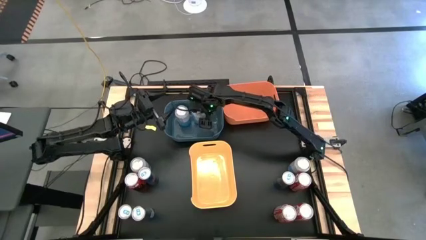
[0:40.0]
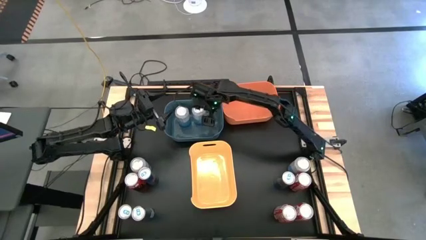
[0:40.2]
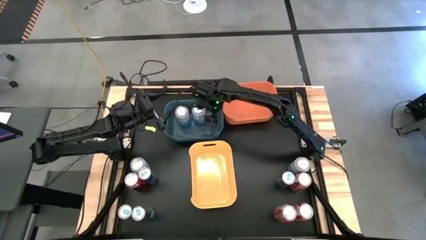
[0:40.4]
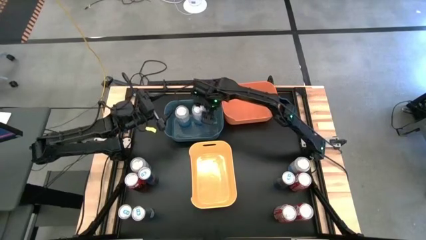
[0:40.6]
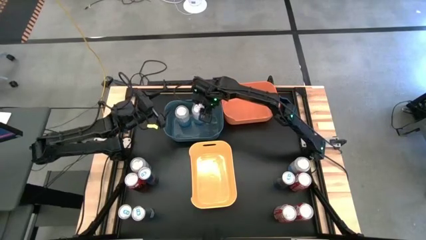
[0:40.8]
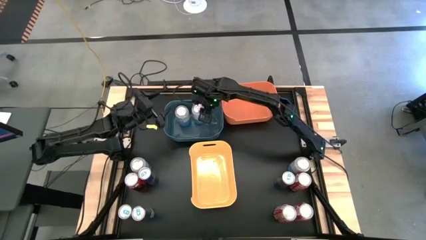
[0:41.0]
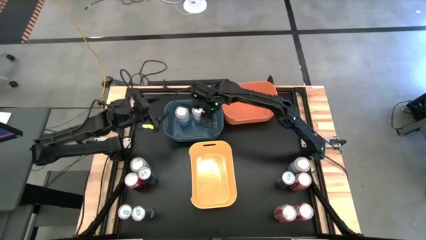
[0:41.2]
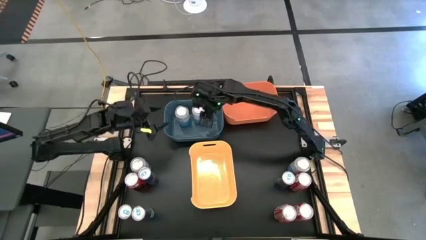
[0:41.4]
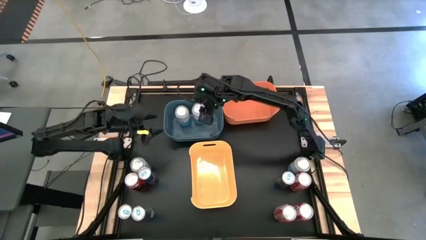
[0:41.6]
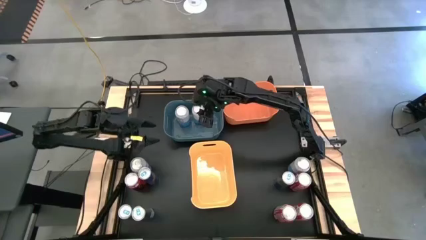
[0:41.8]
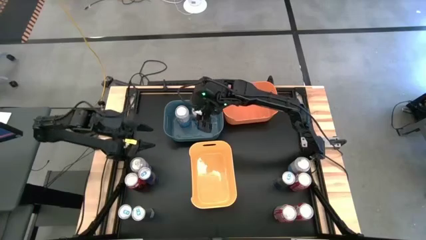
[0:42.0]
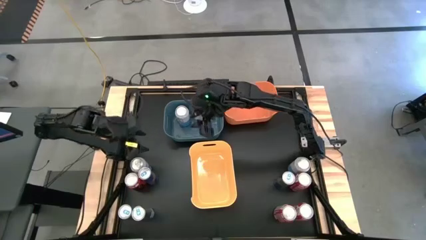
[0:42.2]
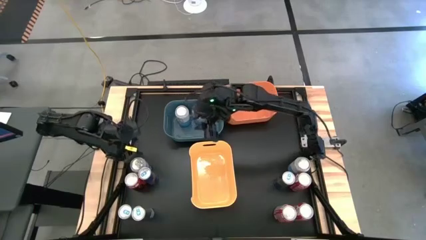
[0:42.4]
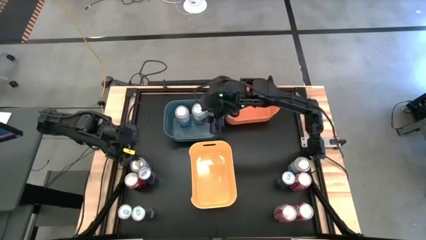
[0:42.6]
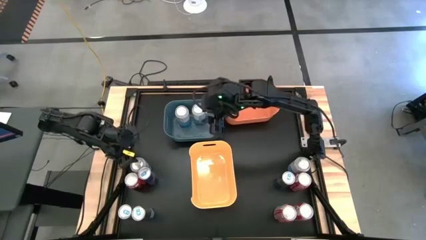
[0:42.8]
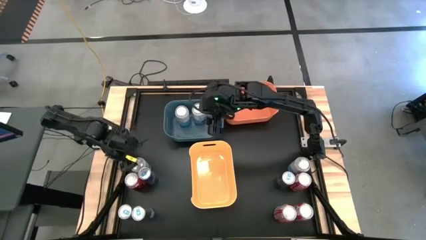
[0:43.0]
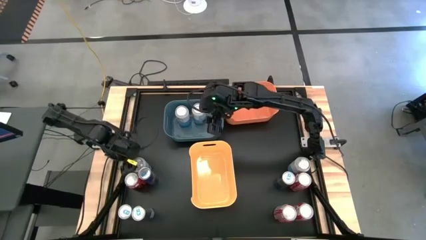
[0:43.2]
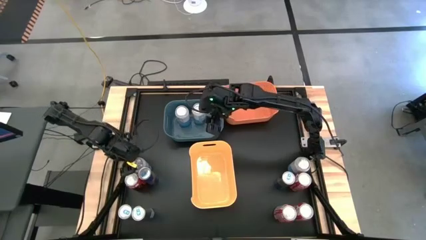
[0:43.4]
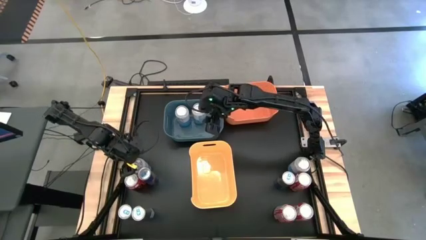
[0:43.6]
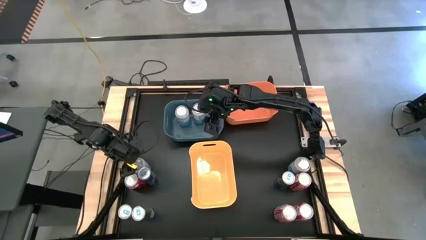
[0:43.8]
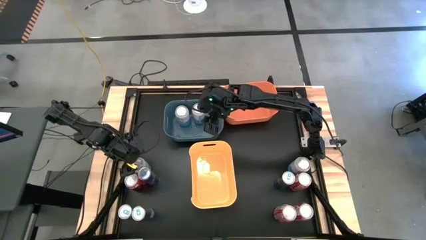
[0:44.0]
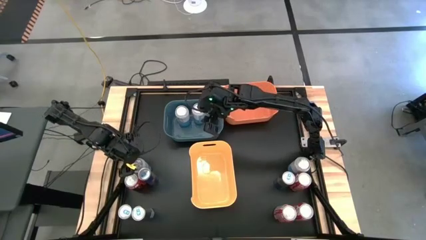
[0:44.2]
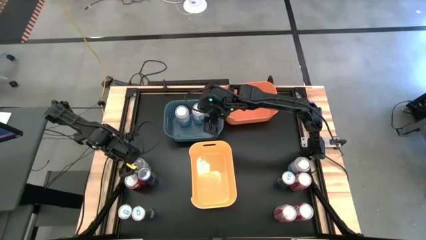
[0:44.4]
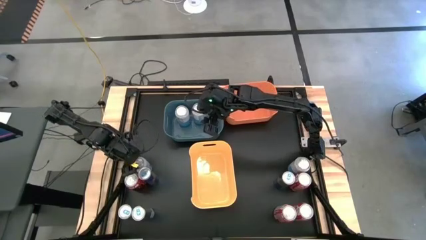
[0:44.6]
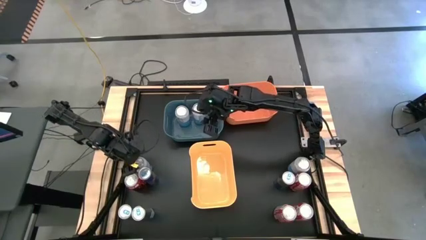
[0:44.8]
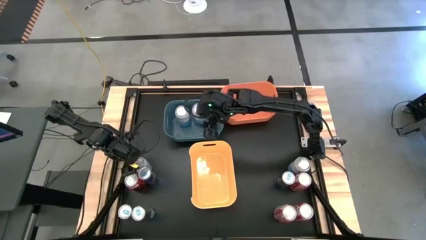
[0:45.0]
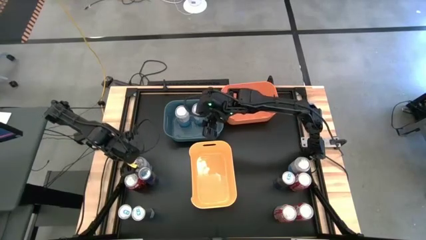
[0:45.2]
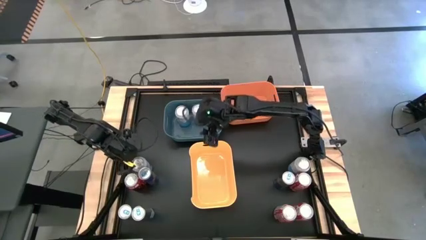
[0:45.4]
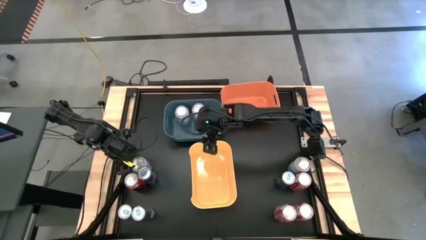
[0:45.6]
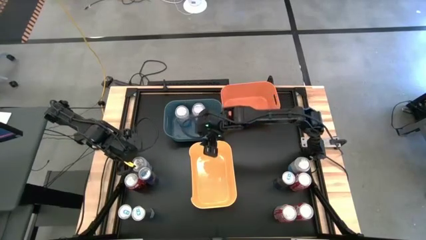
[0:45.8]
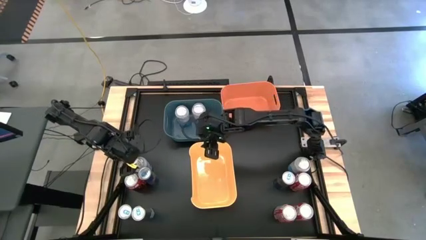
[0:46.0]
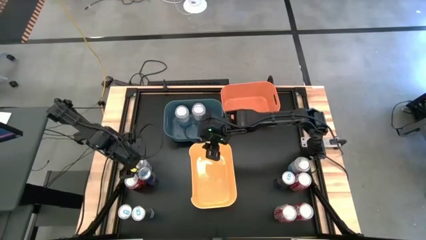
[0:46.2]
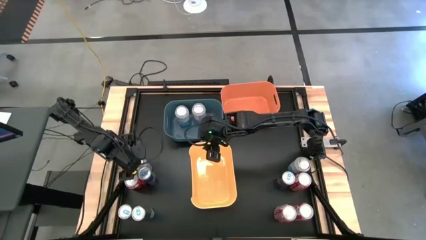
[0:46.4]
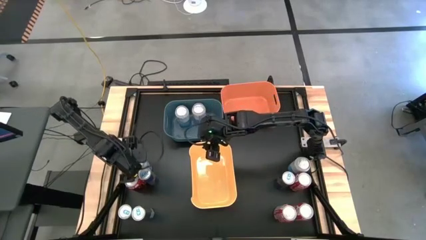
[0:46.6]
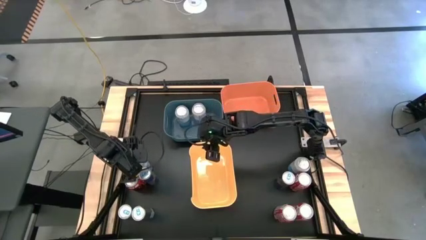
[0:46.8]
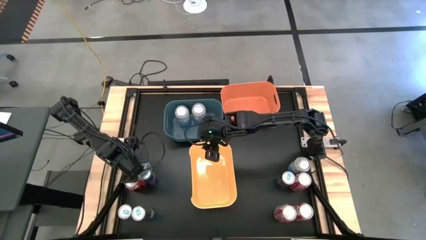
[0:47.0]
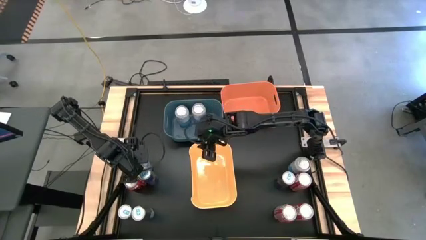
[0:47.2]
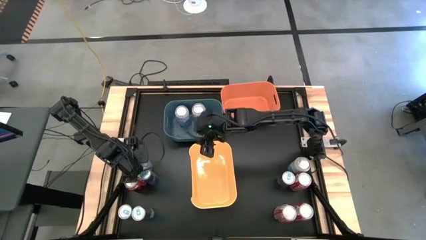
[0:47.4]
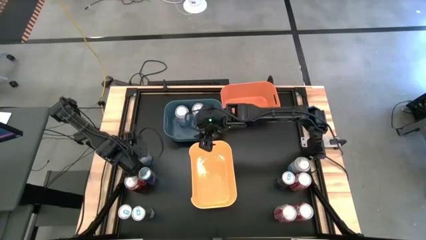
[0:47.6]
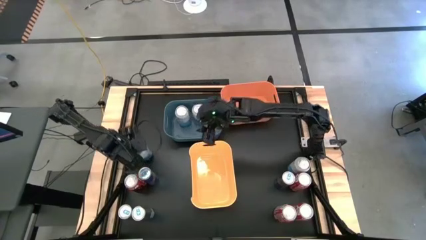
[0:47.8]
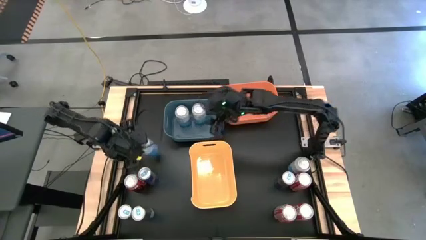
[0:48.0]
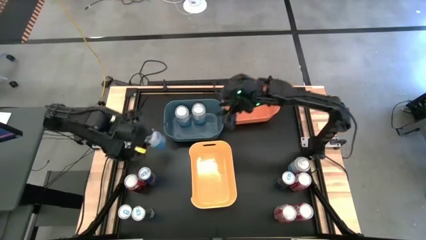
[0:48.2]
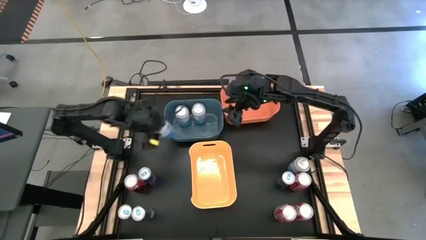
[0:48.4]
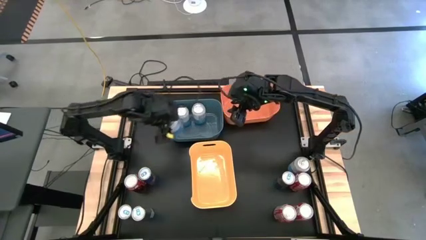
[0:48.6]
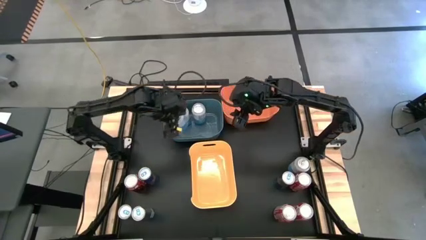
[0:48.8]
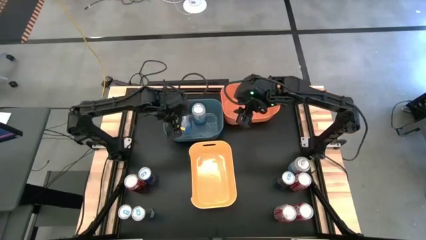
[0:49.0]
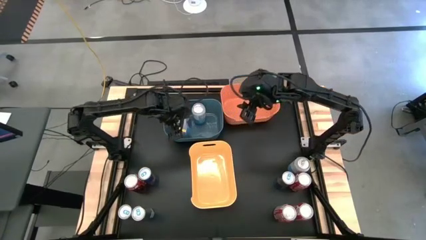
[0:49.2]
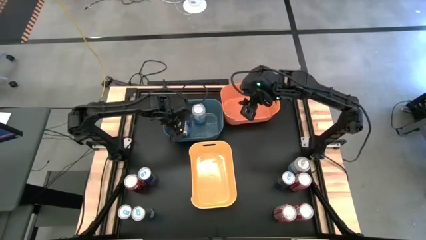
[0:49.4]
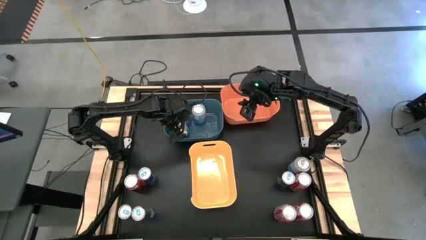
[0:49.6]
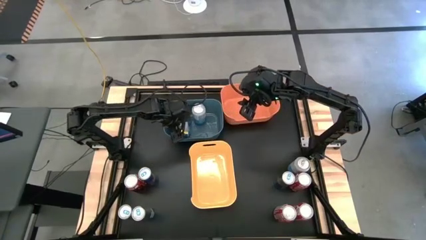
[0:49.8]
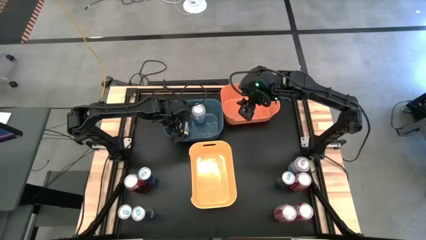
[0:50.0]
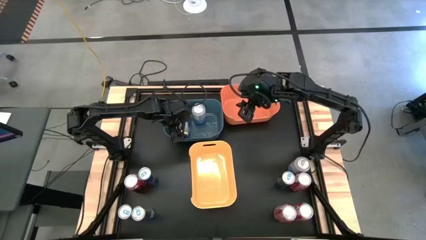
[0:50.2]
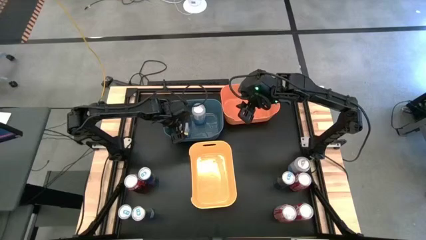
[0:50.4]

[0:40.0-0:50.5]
Task: Sort soda cans
Put the left blue-white soda can into blue bin

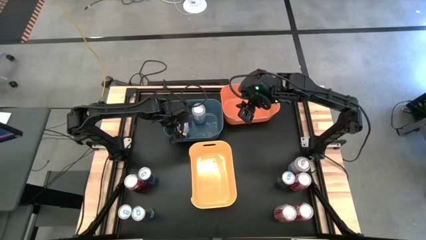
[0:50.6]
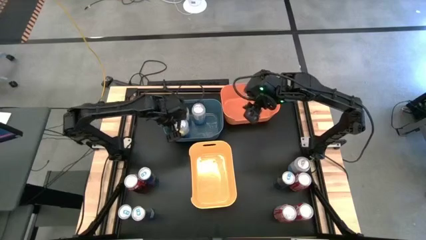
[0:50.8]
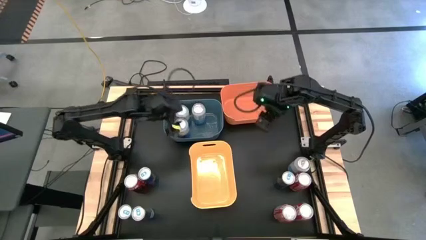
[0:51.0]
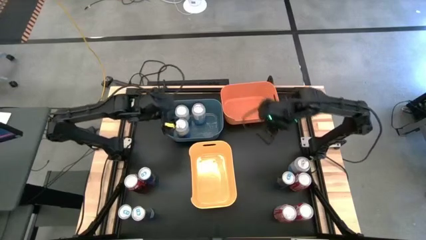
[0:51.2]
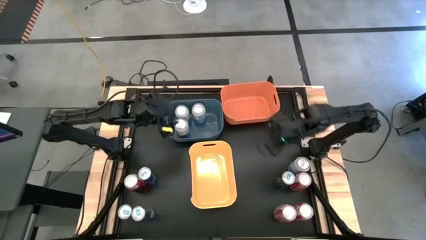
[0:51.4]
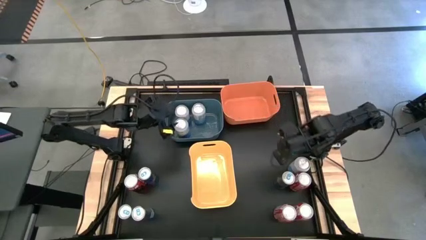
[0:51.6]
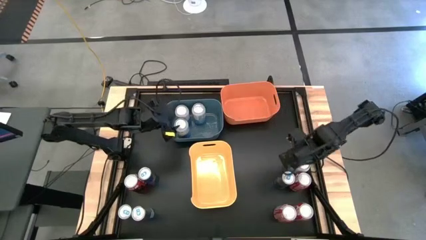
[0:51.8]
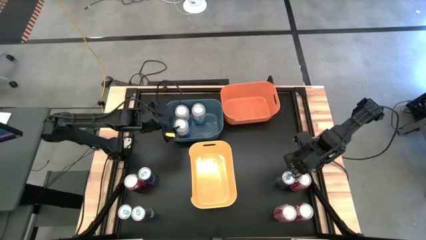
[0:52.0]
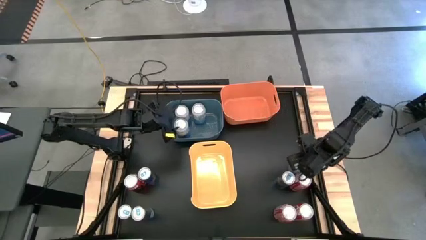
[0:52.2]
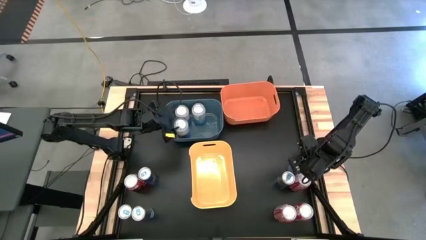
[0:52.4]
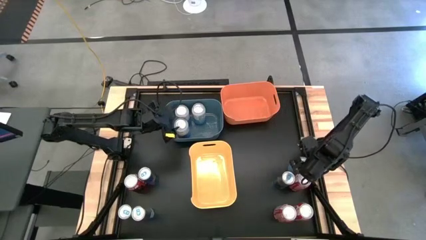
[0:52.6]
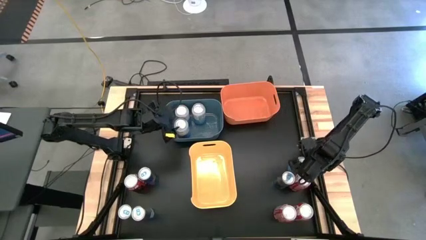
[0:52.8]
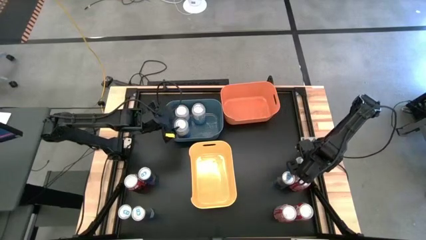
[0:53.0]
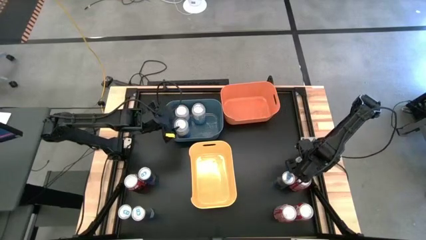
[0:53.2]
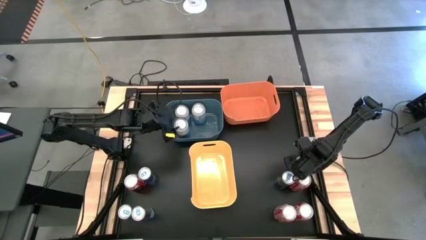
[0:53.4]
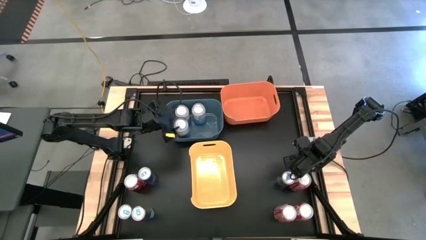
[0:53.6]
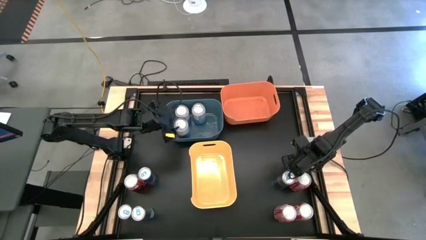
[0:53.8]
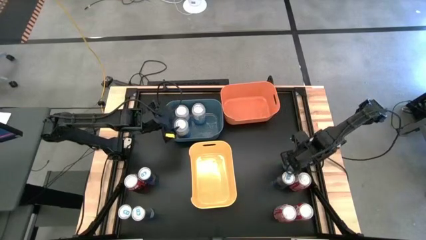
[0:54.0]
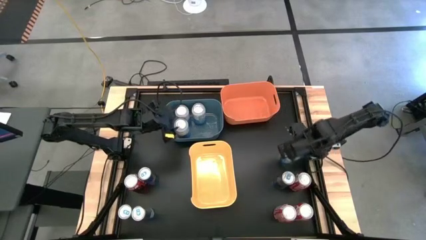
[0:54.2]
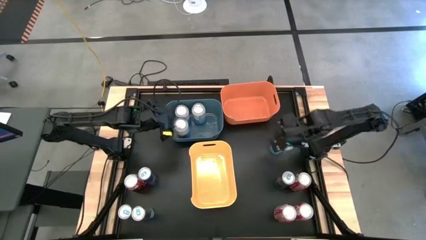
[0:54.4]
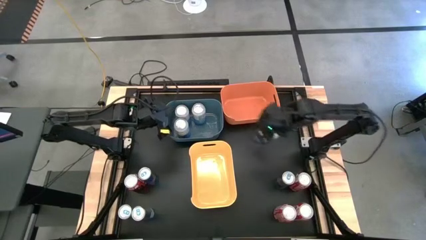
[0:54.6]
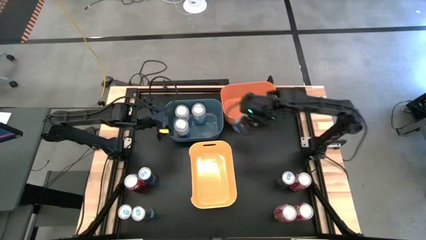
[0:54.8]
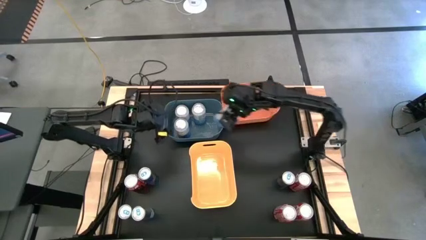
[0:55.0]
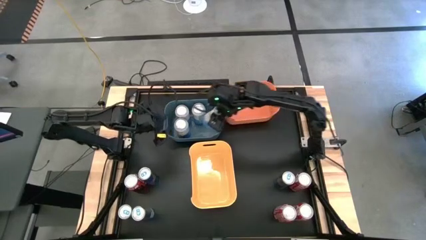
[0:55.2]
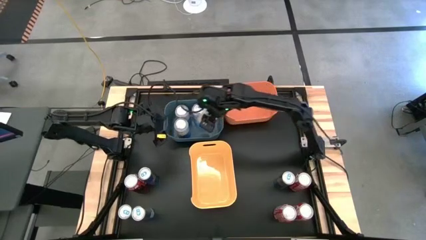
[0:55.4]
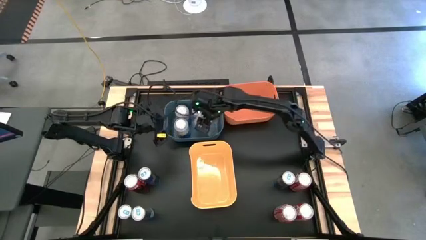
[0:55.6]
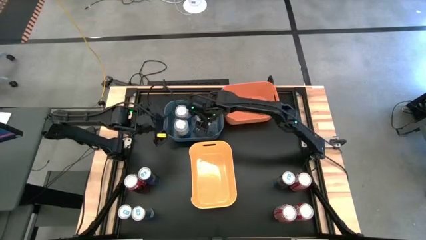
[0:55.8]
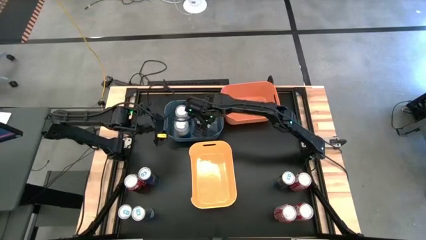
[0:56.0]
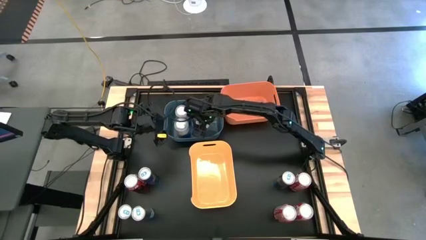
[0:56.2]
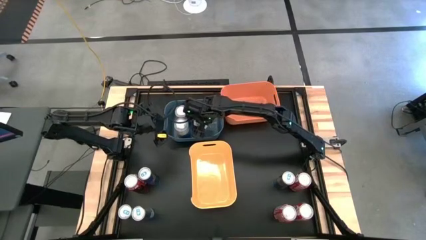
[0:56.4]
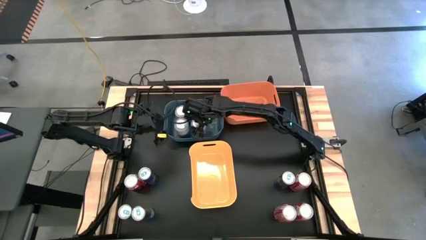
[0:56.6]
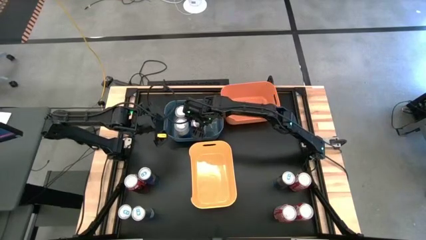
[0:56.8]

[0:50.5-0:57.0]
Put the blue-white soda can into the blue bin
